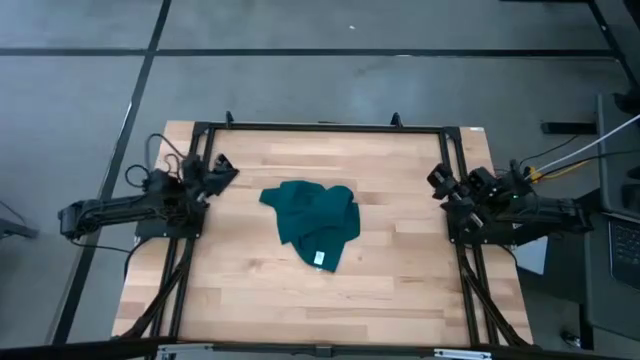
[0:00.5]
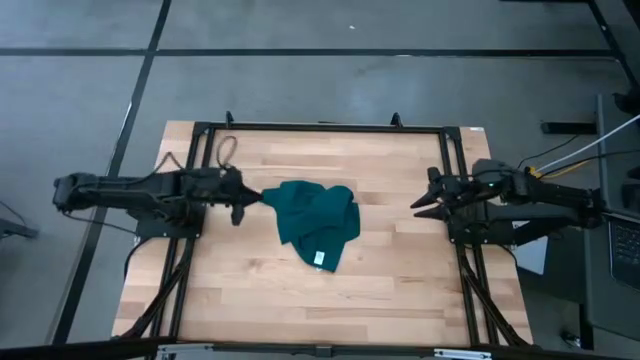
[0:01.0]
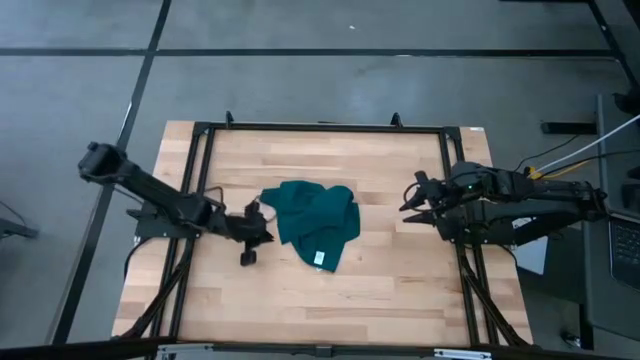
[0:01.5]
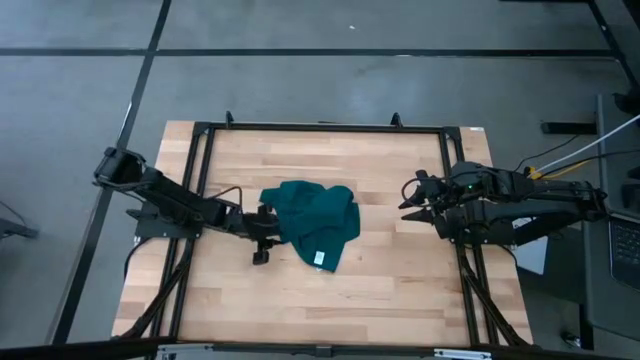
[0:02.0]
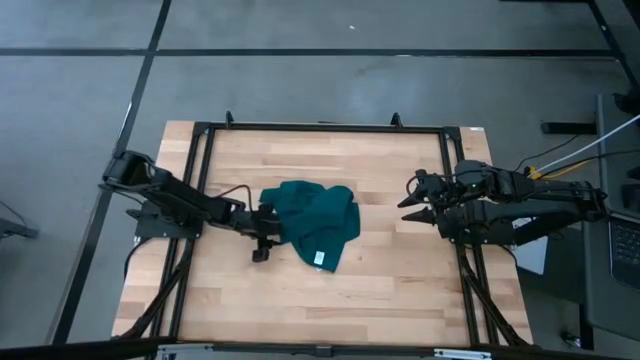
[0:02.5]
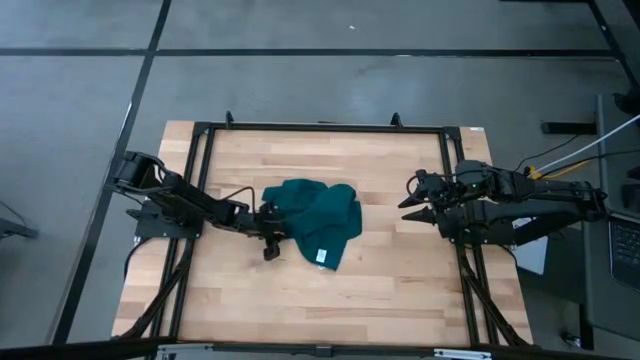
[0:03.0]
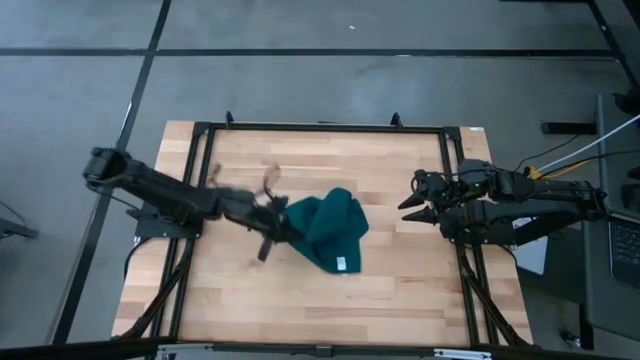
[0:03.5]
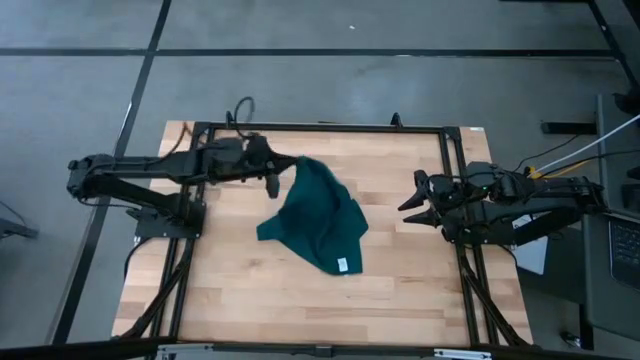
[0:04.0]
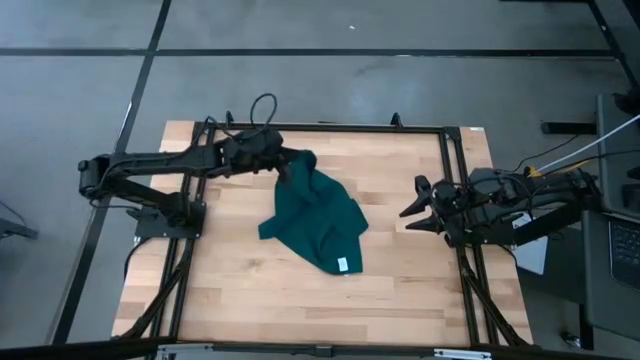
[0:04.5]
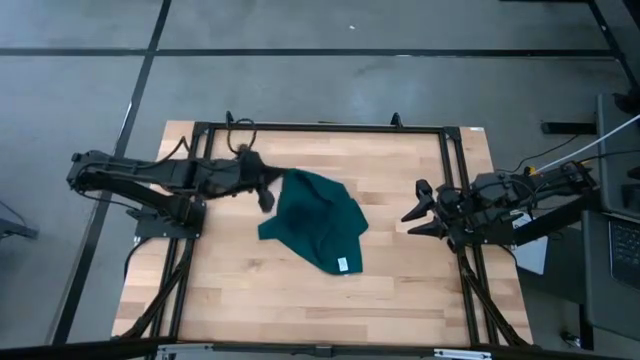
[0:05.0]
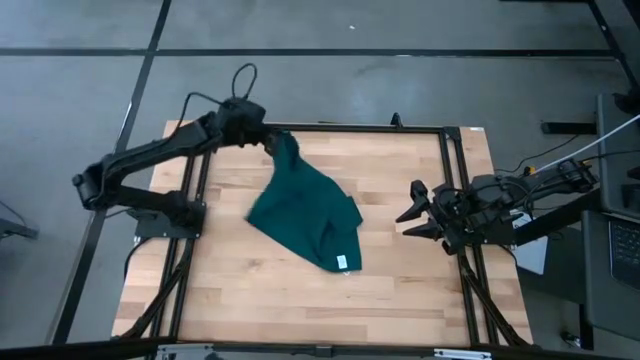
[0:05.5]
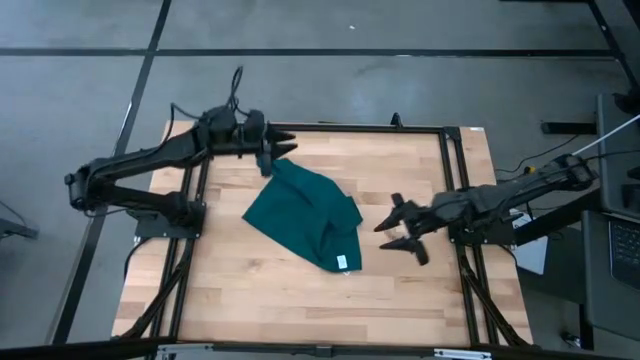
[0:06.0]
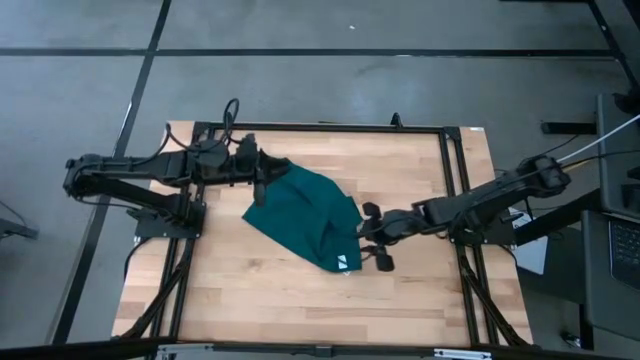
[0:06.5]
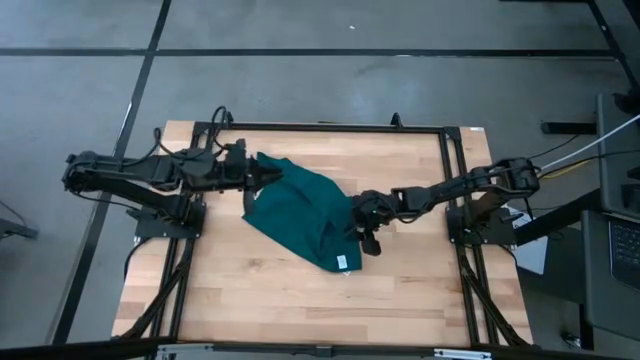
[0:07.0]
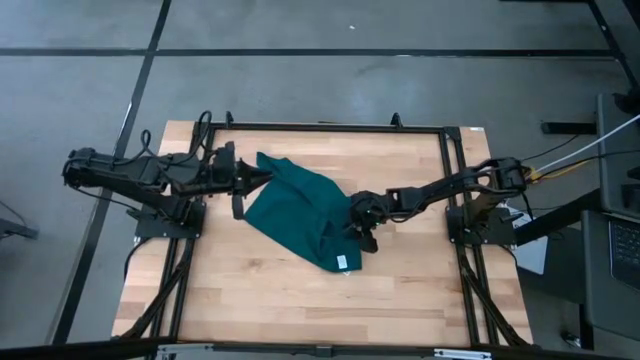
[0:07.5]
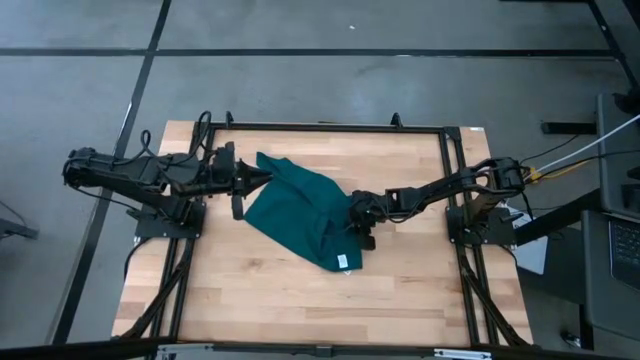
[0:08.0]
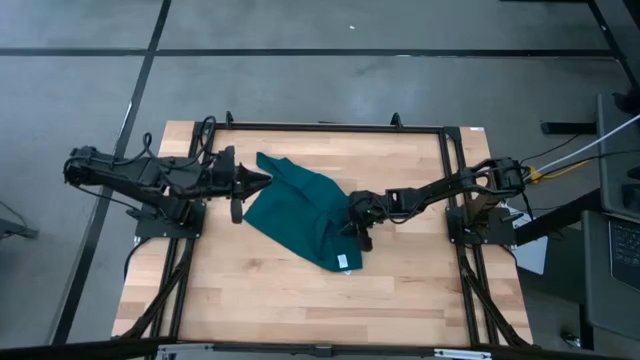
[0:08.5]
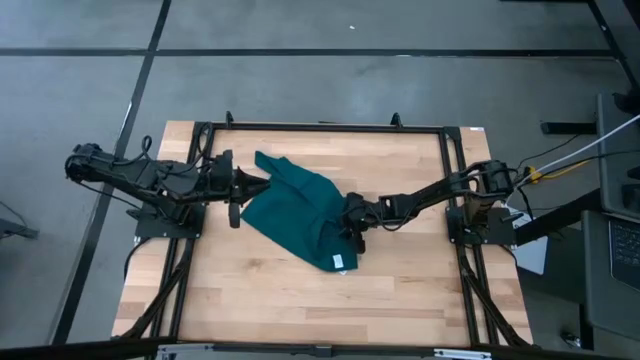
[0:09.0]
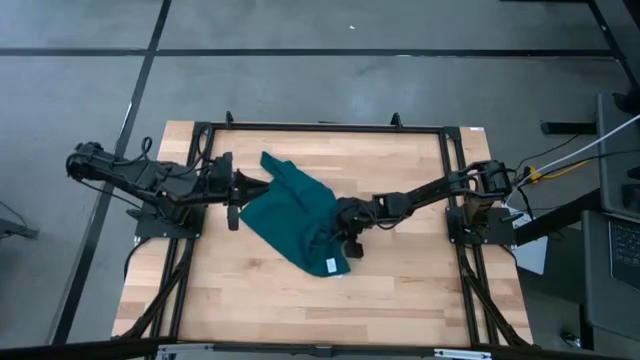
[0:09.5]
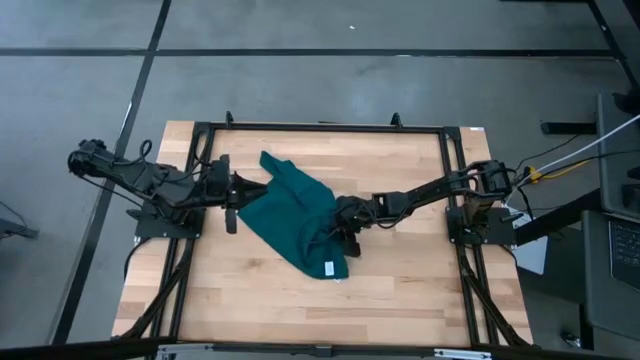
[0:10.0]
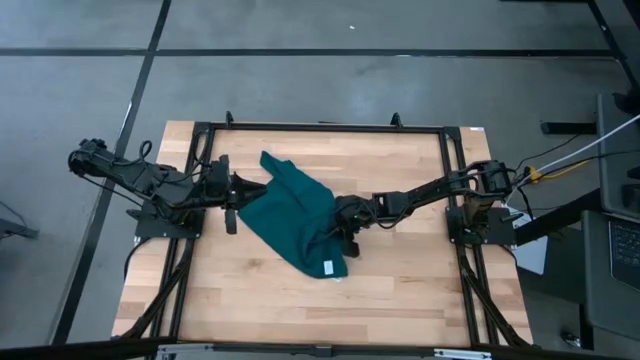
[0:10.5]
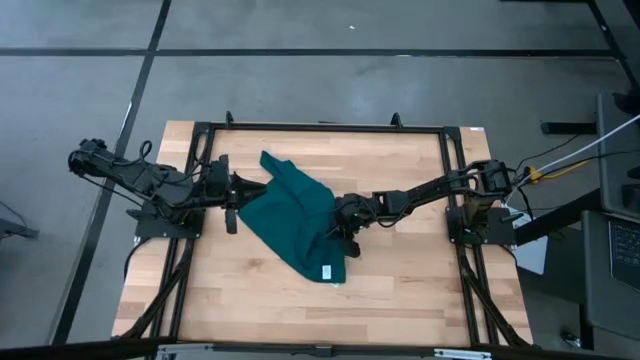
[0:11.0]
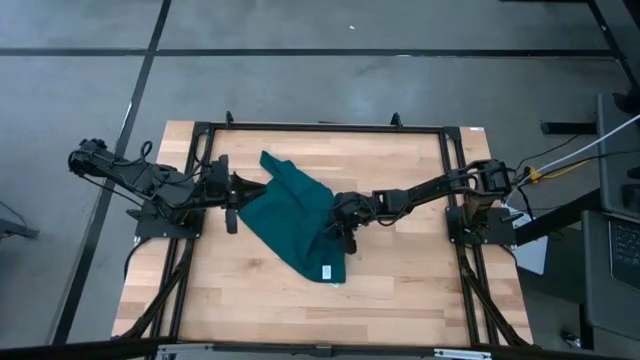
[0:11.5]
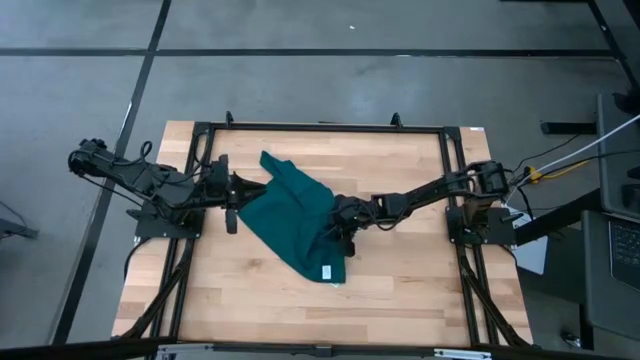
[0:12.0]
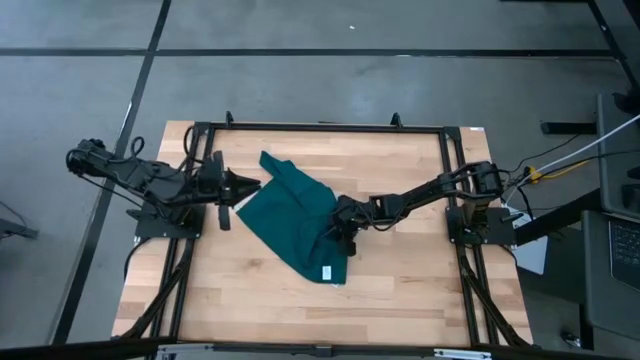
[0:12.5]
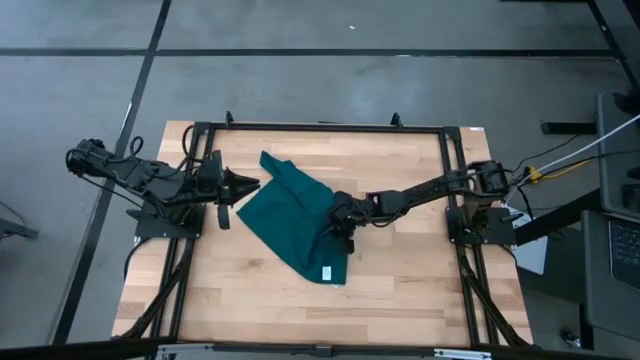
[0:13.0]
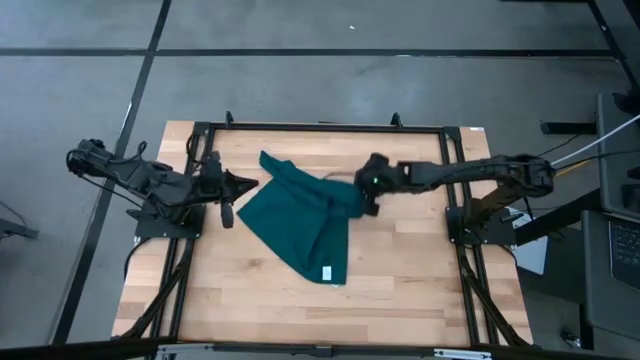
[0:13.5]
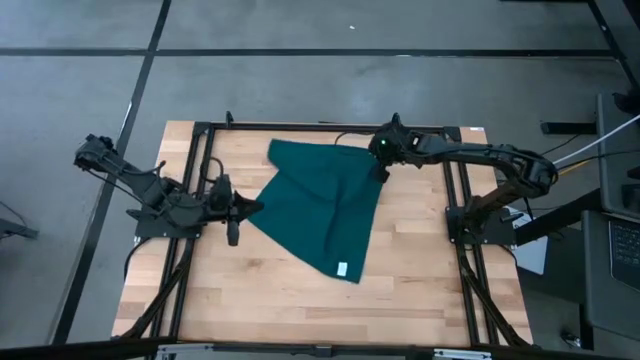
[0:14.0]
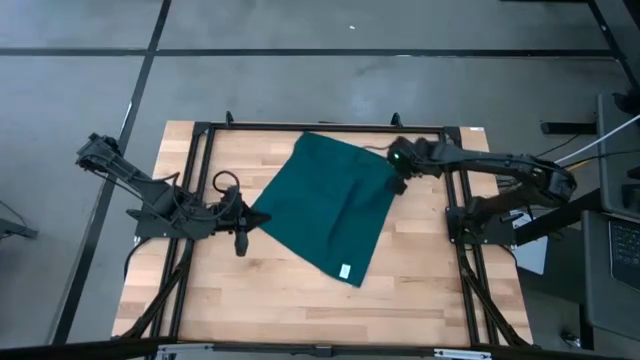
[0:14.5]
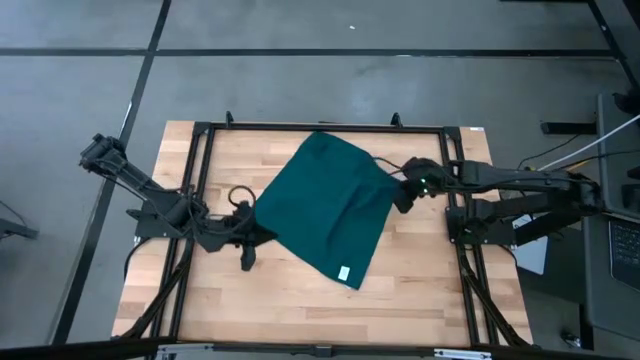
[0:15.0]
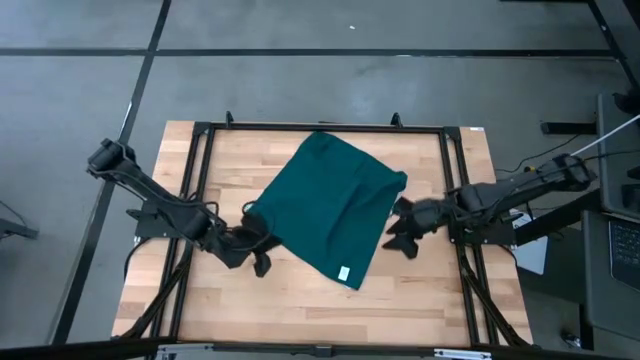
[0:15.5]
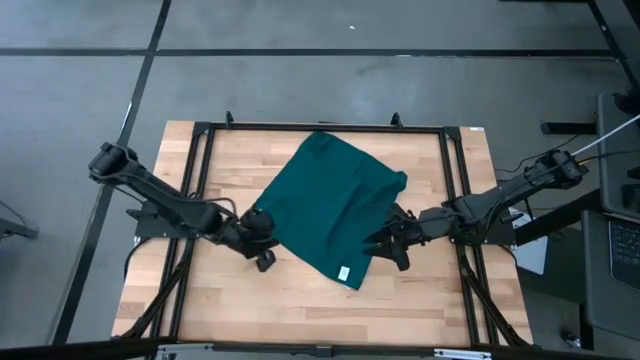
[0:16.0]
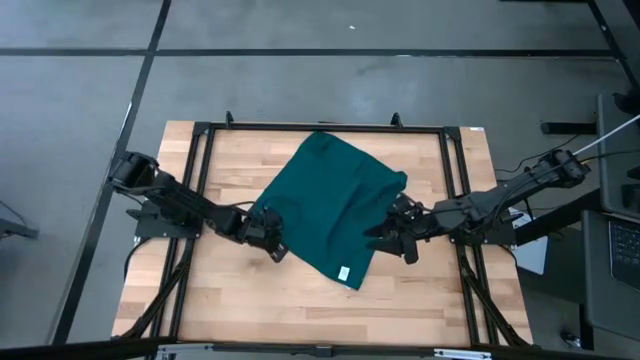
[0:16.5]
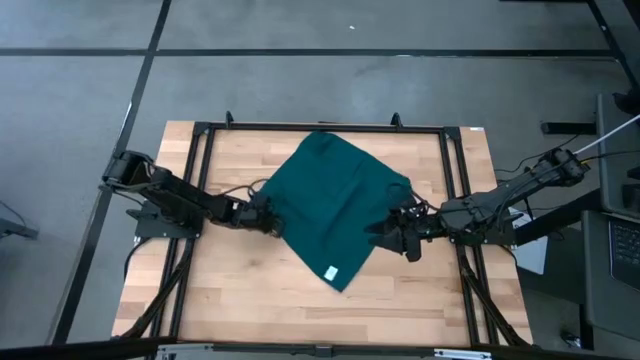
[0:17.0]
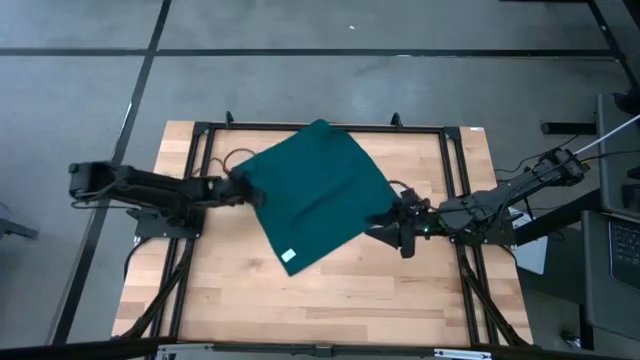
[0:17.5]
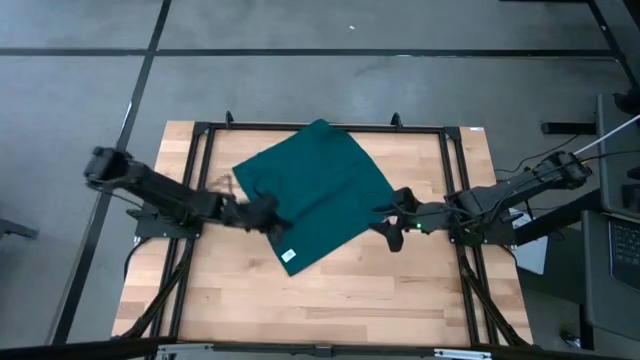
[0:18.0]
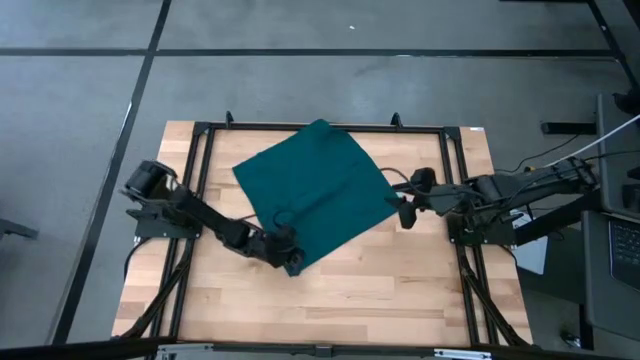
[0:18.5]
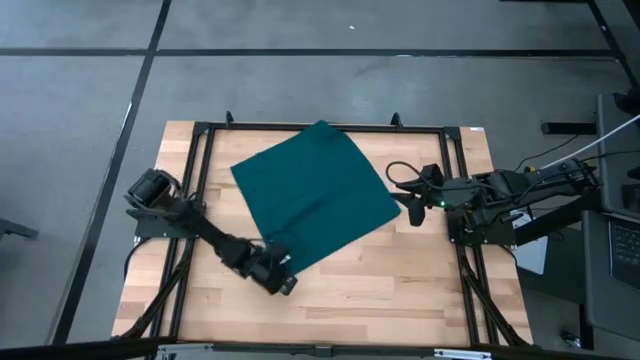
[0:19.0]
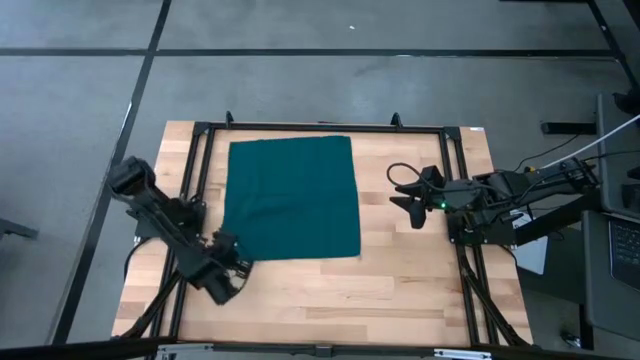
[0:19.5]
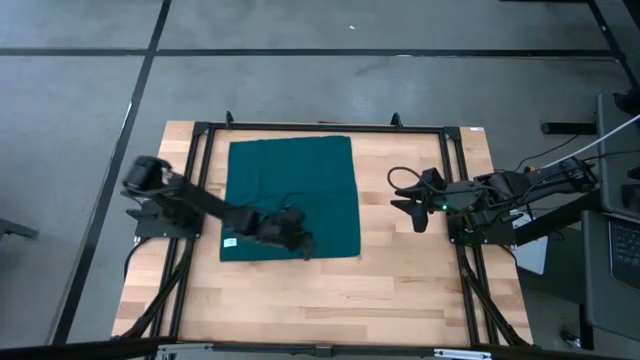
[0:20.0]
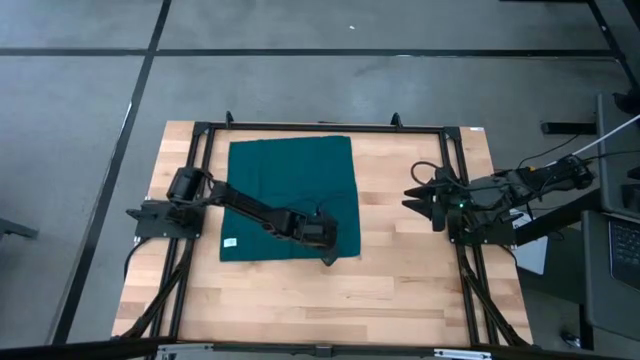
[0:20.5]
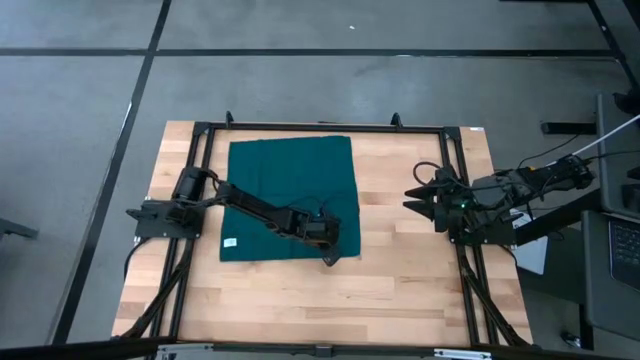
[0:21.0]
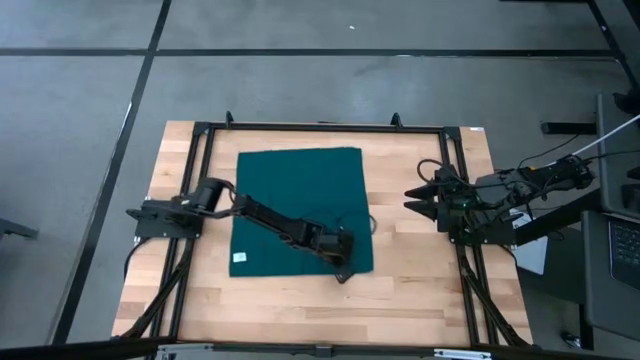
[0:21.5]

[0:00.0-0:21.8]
Task: Fold microfiber towels
Prepare the green towel for folding
